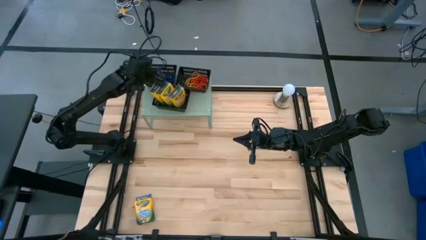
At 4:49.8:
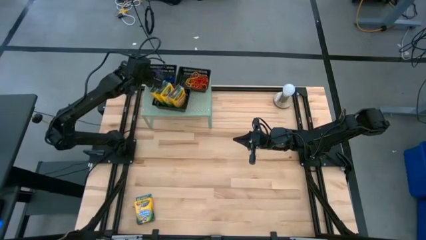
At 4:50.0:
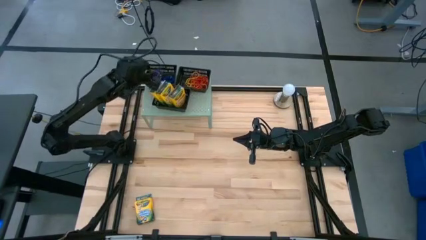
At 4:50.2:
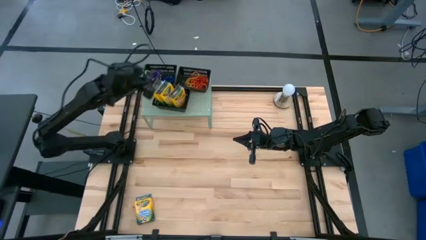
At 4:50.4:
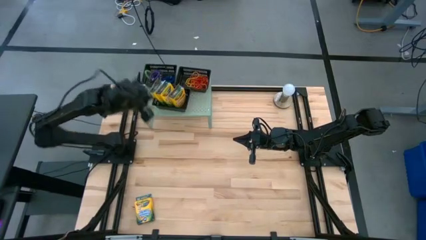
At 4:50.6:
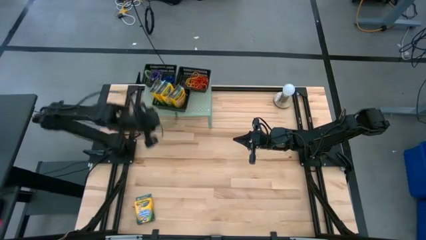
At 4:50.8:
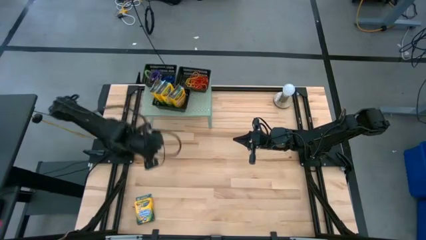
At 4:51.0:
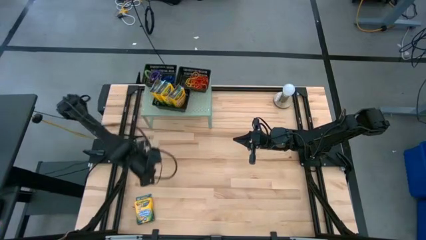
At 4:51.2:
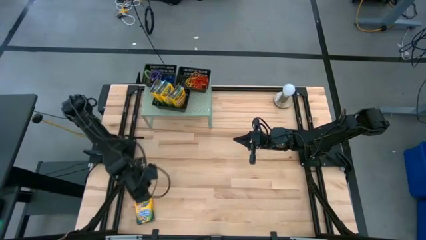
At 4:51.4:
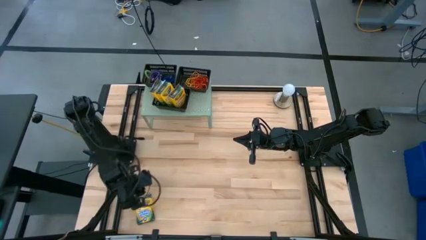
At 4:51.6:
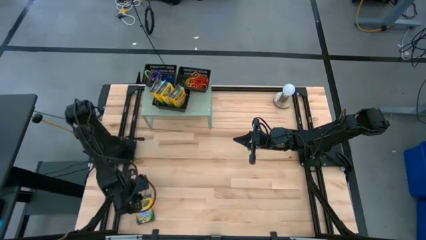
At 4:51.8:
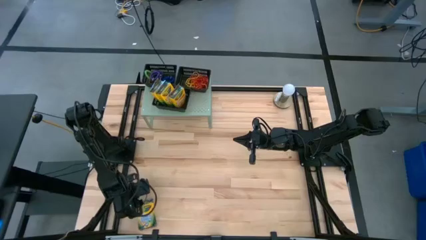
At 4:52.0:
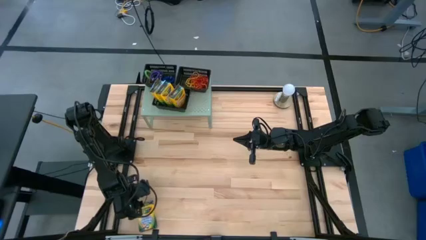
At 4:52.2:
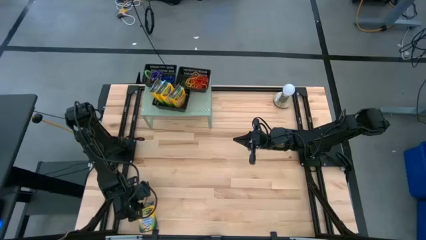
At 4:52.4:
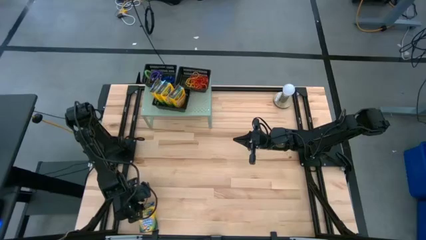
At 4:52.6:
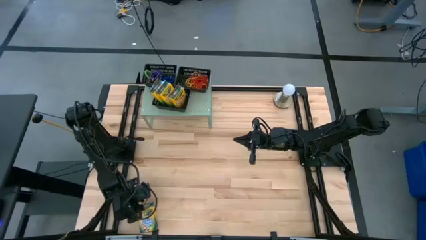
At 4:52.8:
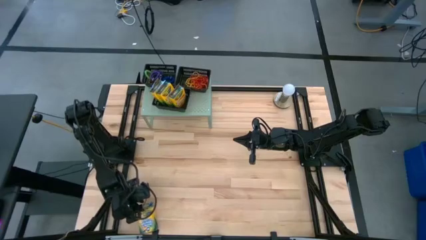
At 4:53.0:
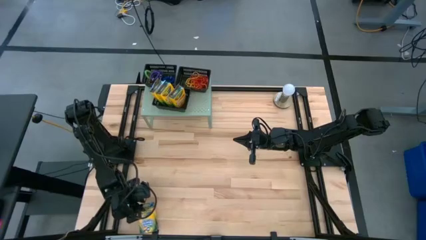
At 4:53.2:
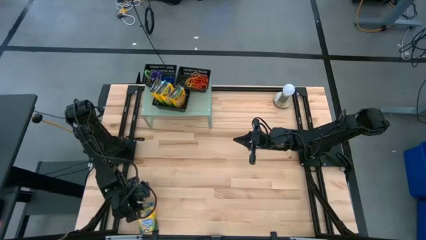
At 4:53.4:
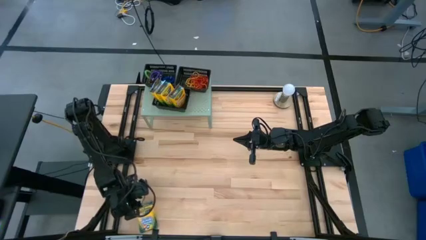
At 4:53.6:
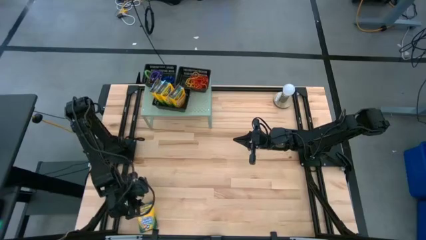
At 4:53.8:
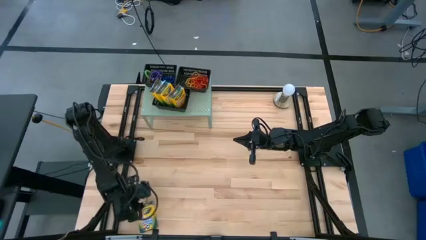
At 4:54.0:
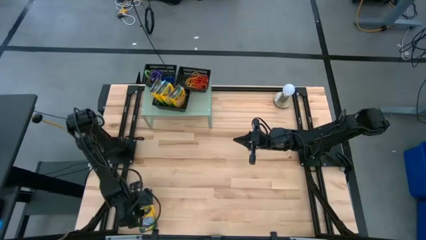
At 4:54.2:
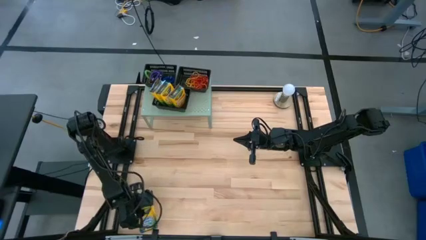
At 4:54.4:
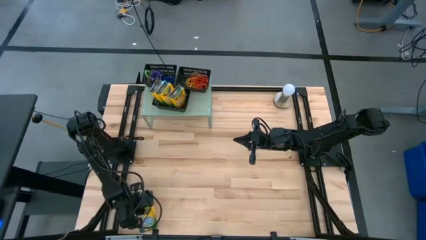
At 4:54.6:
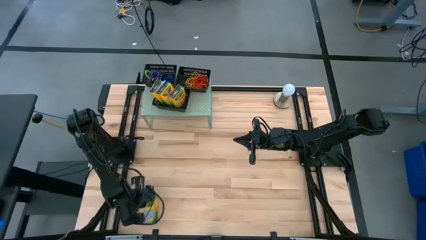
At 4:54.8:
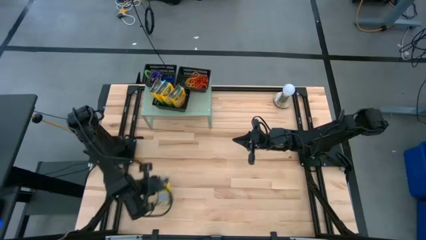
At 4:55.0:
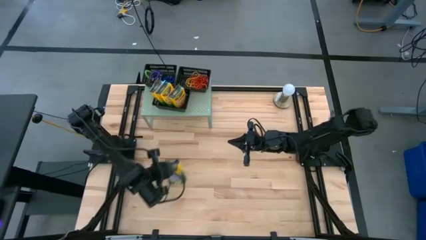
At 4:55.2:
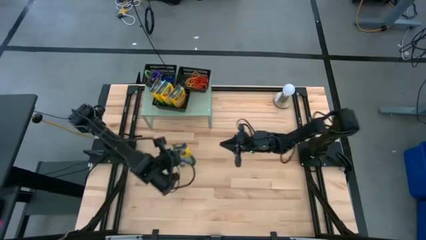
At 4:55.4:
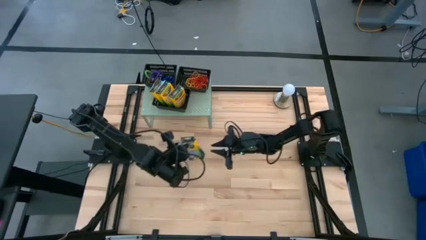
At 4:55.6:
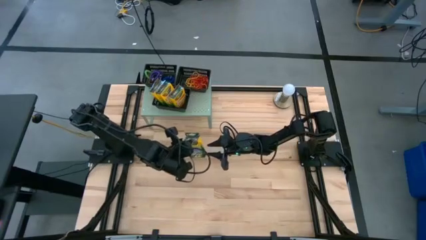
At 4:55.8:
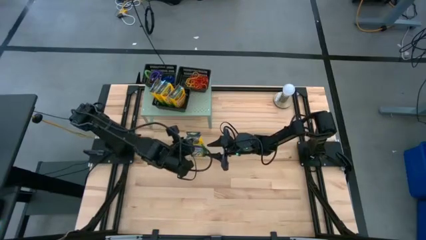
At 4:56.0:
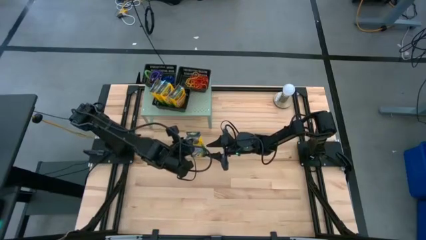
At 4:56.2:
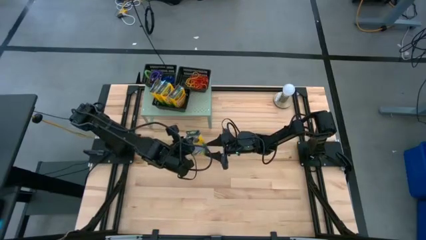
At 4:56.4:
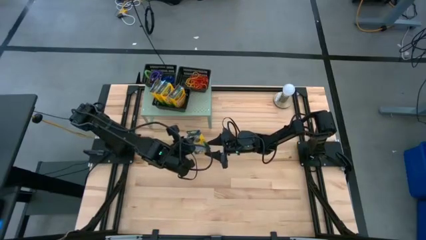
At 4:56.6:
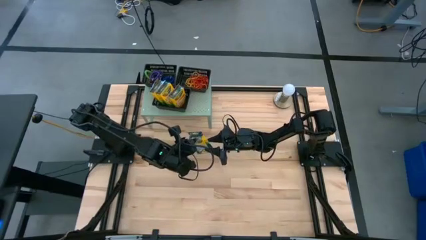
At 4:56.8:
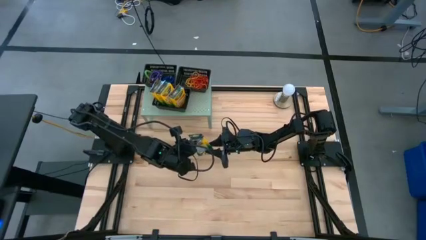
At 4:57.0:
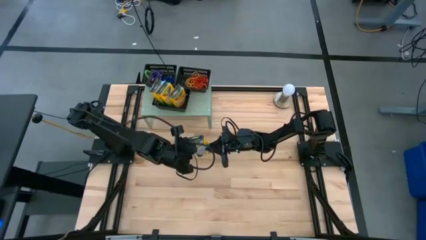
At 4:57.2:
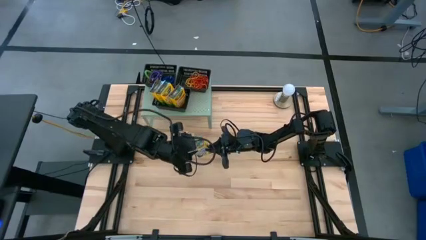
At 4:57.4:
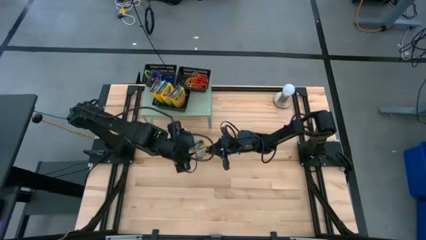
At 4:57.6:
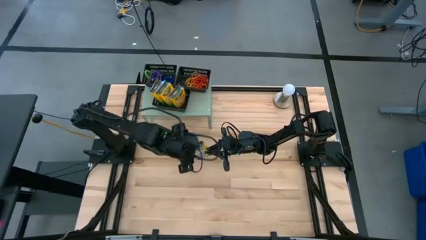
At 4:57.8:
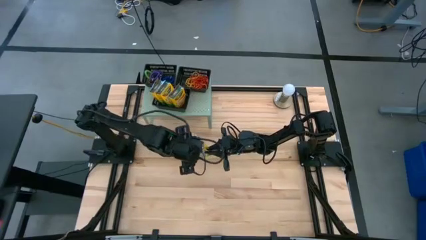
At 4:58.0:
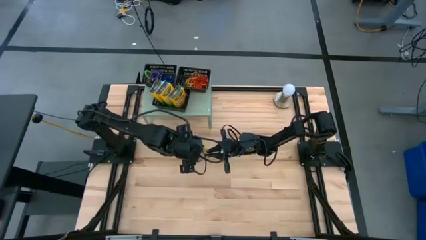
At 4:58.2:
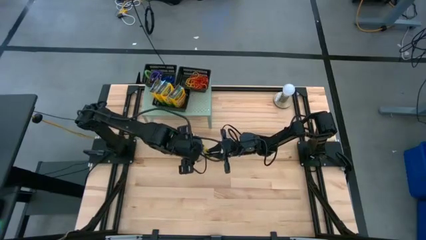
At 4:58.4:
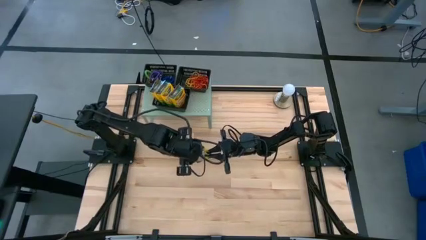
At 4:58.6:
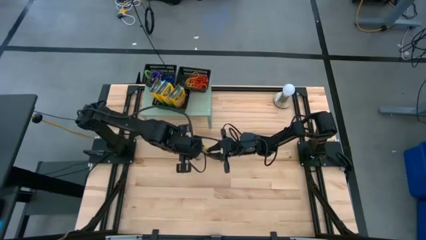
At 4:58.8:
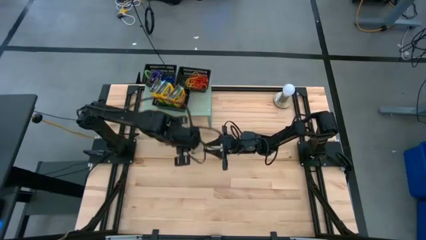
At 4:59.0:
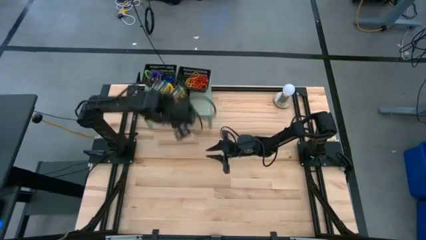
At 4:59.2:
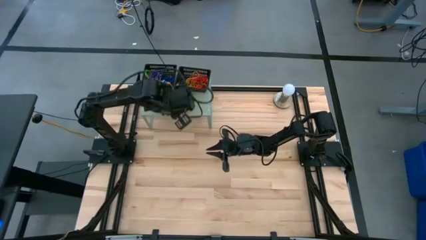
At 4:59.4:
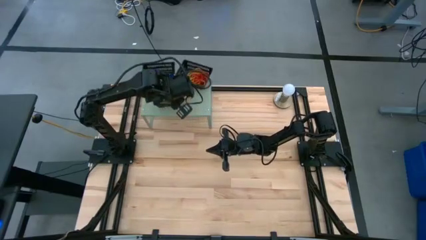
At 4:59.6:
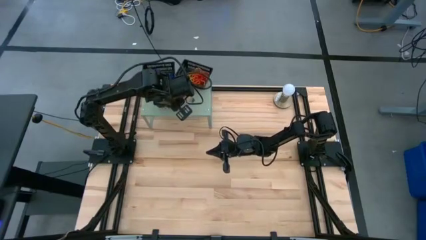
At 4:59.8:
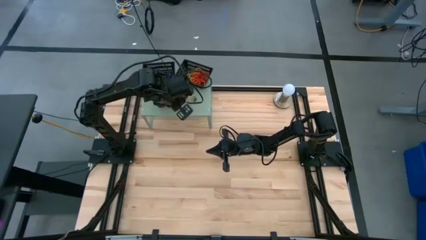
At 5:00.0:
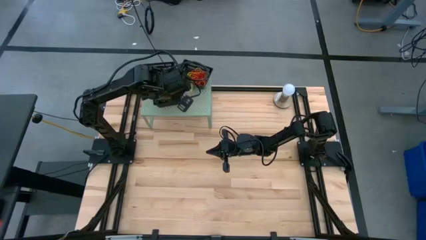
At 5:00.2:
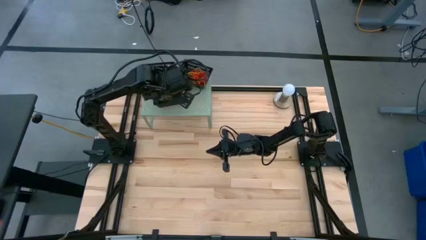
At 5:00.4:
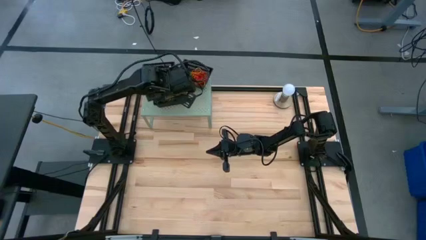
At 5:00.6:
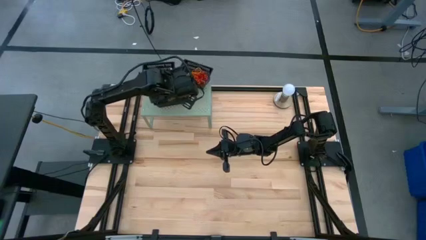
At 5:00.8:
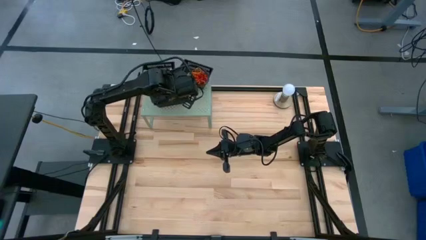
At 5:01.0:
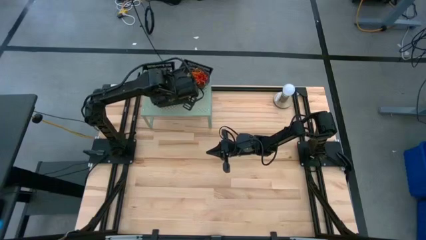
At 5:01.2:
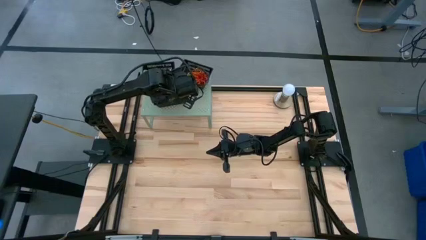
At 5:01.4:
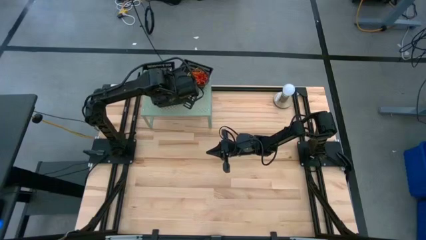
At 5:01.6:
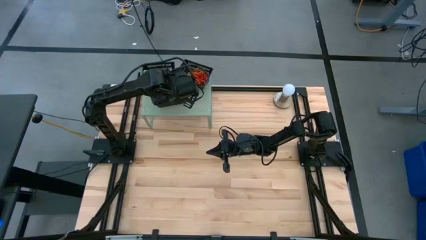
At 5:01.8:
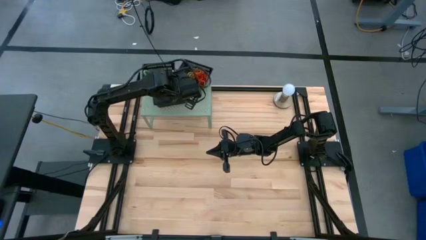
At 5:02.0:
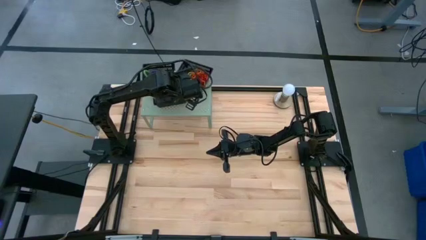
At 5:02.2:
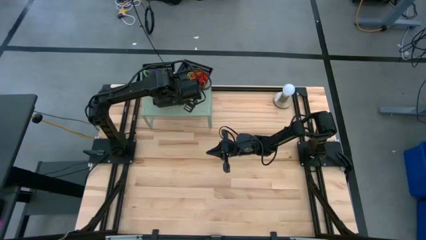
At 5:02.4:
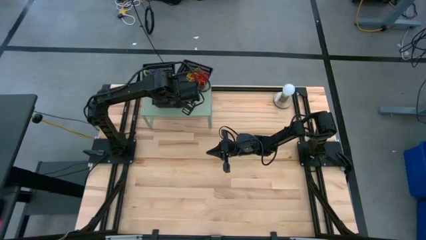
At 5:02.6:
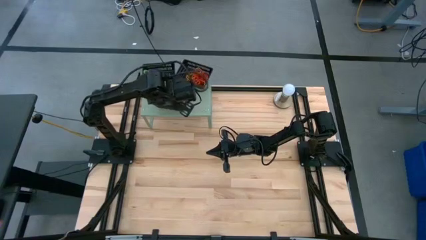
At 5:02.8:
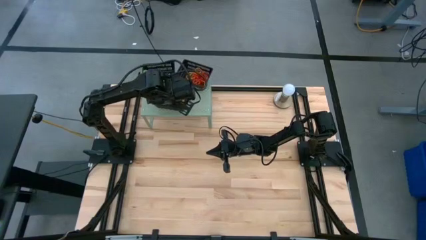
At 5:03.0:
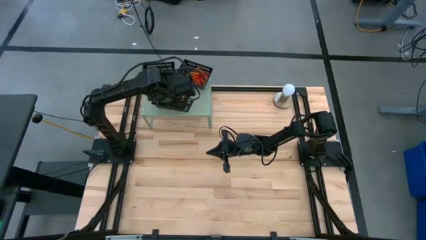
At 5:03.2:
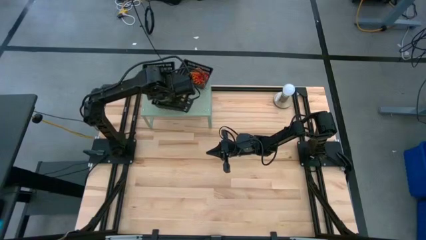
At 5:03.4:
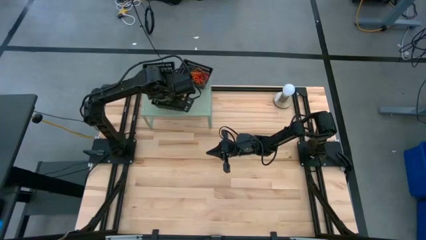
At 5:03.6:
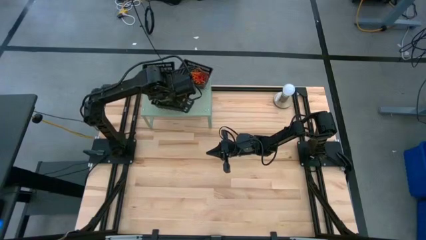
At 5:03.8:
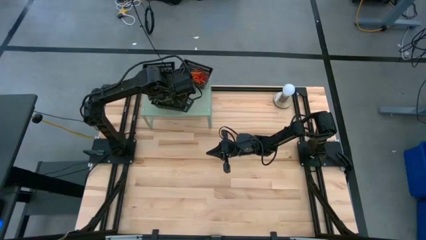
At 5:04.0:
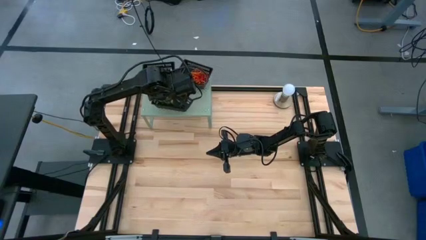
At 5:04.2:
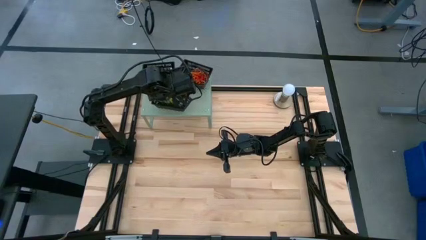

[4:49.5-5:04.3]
Task: Pick & Place Office Desk Supplies
Put the yellow crayon box into the bottom black bin

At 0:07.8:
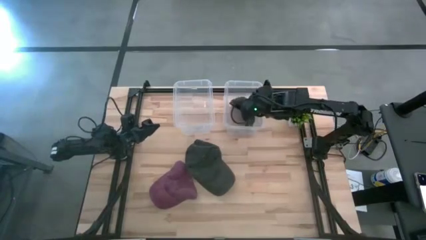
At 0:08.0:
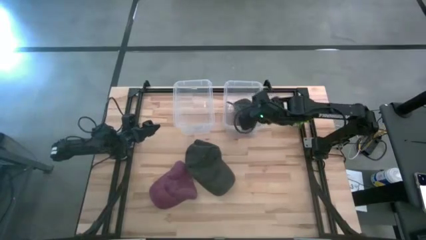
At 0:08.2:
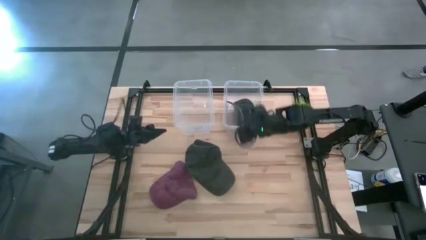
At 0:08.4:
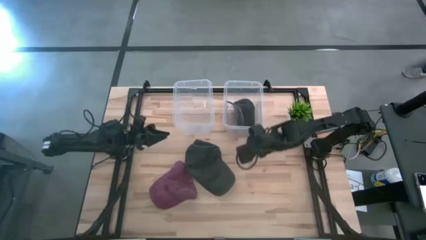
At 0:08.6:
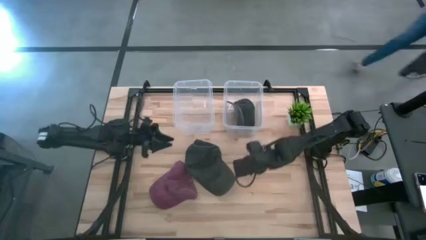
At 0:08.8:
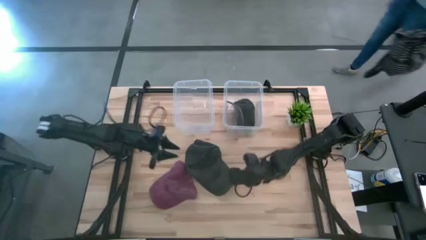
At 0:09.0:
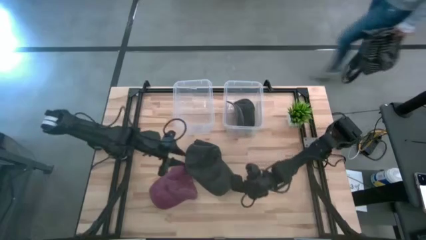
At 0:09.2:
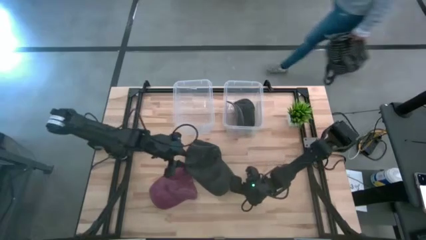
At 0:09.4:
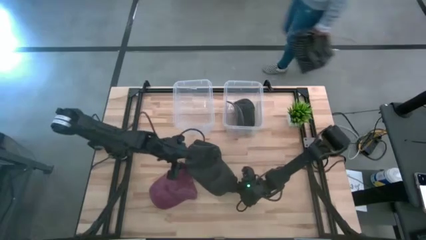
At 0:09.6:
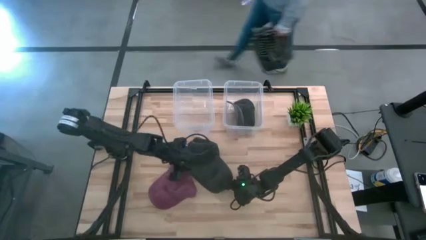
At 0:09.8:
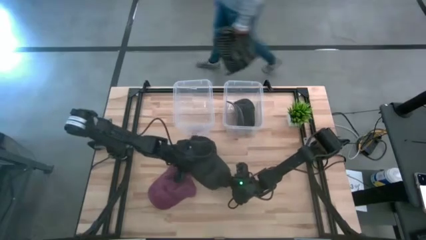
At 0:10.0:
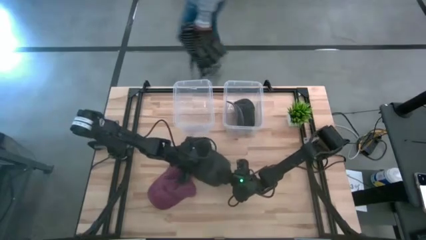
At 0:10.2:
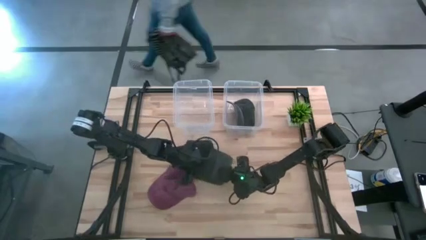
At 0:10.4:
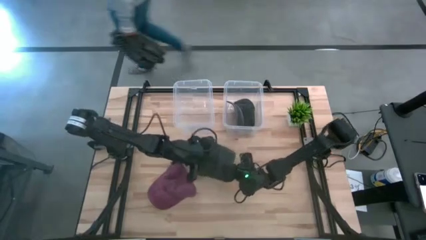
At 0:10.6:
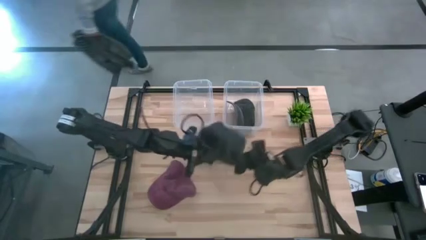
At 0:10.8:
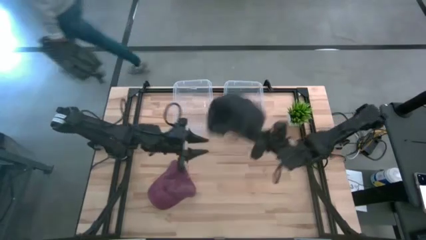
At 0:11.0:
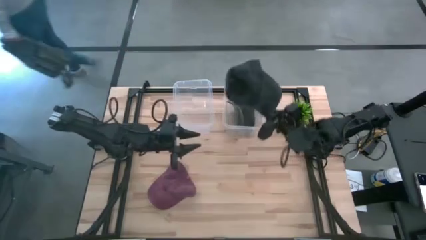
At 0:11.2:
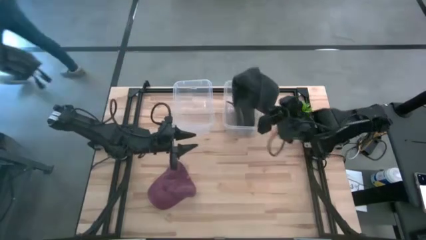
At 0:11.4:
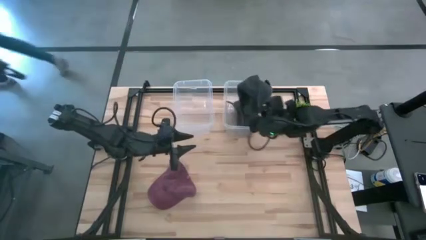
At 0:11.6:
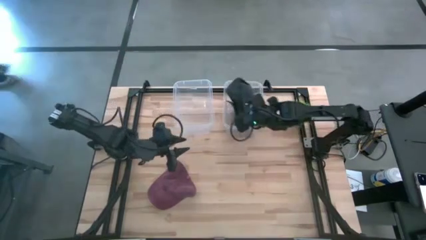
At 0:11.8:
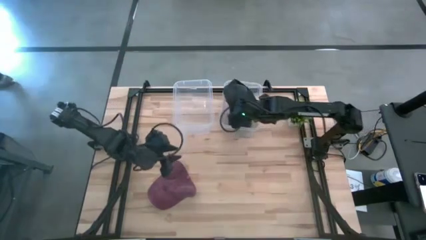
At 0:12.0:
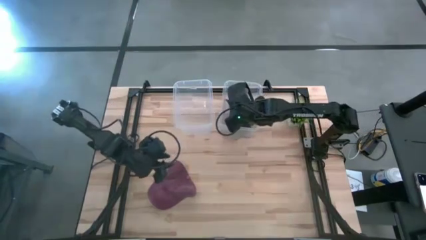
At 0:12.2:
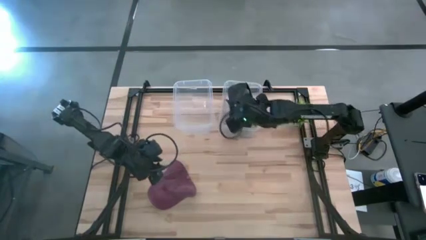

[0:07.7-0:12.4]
Task: Pick & Place hat
Put the black cap into the right transparent bin
